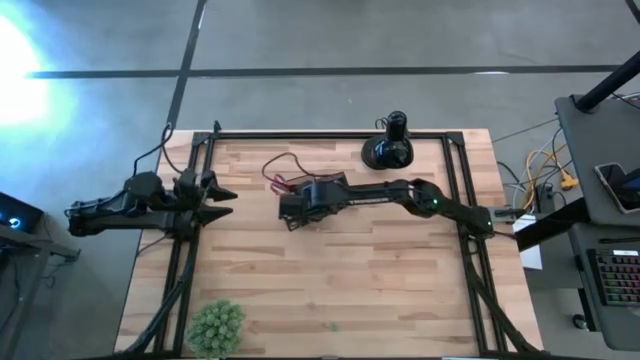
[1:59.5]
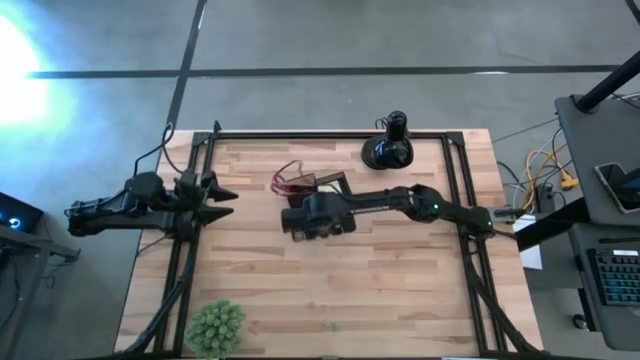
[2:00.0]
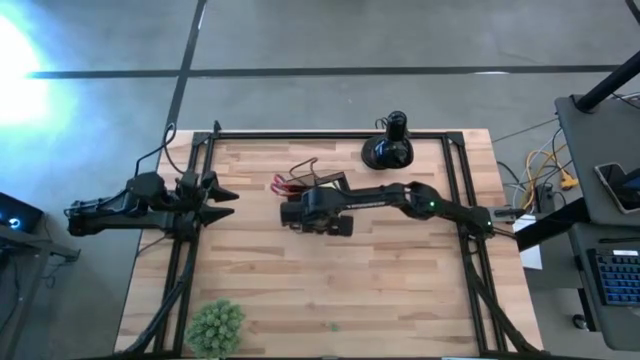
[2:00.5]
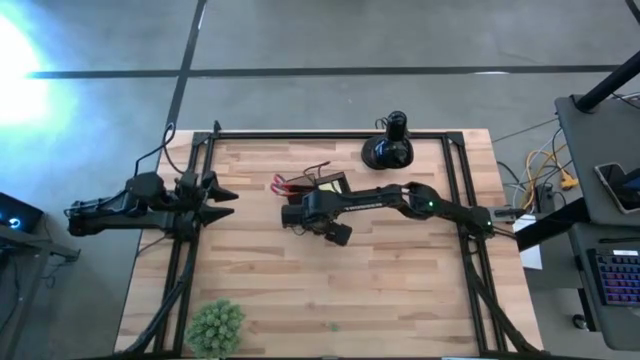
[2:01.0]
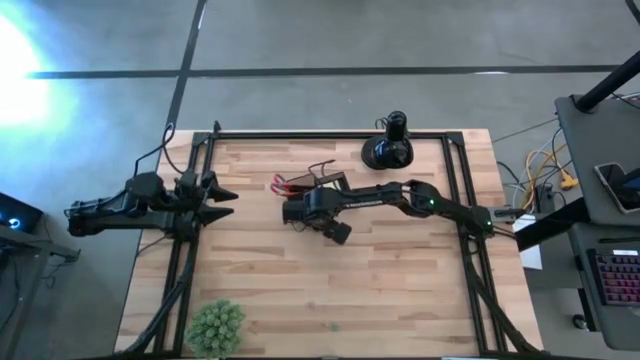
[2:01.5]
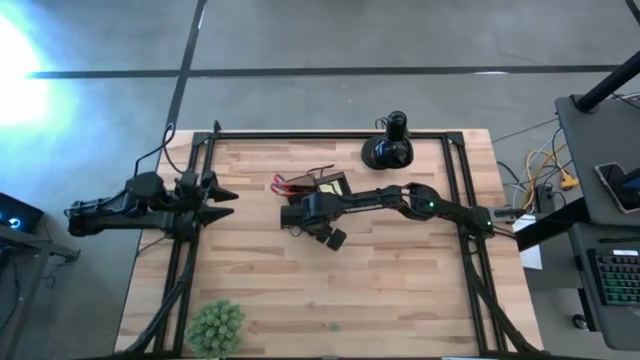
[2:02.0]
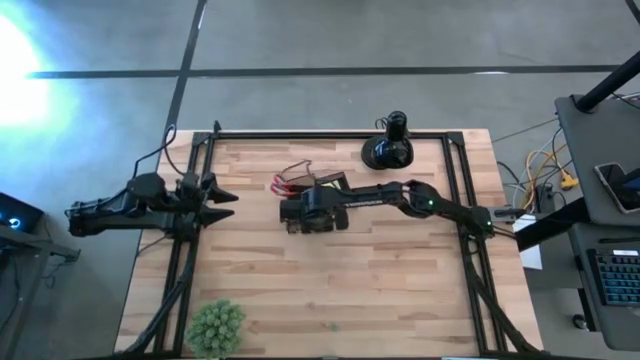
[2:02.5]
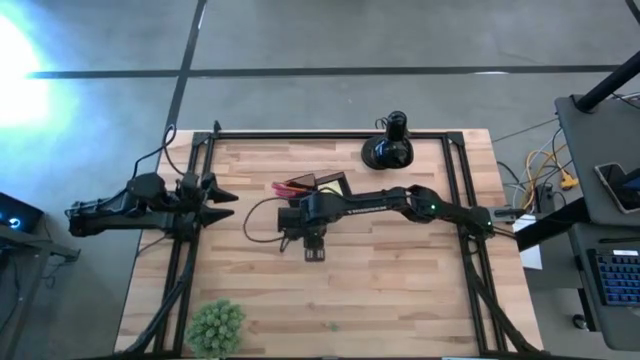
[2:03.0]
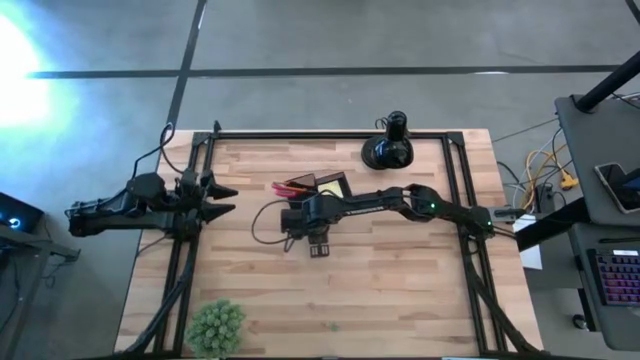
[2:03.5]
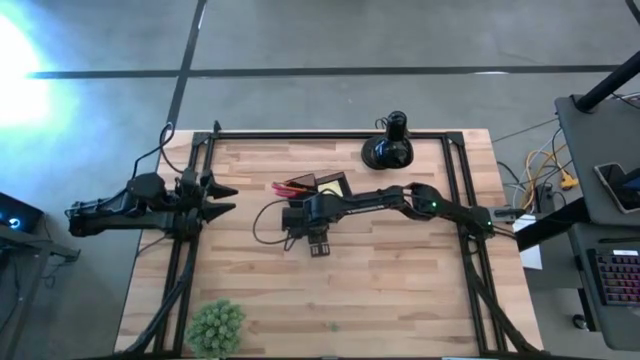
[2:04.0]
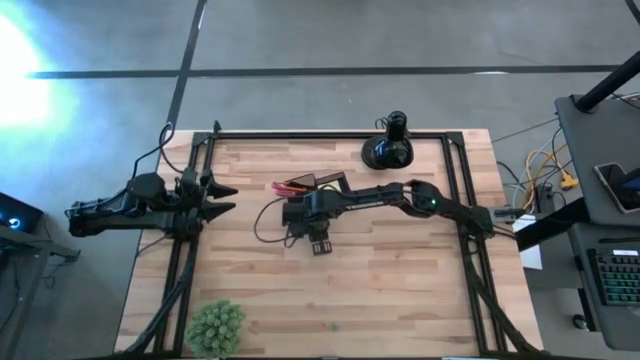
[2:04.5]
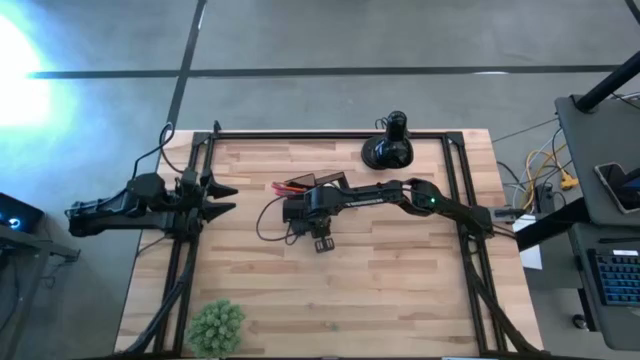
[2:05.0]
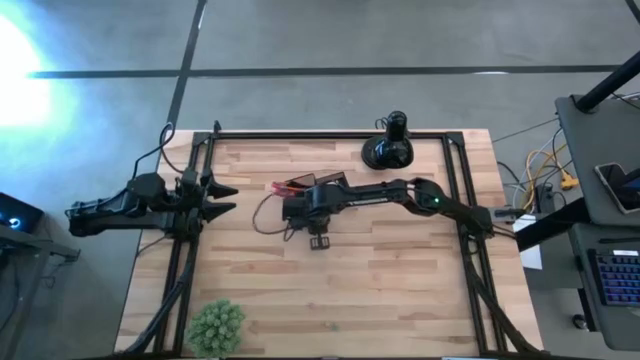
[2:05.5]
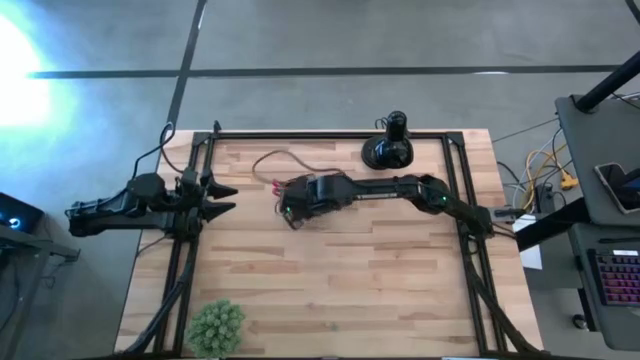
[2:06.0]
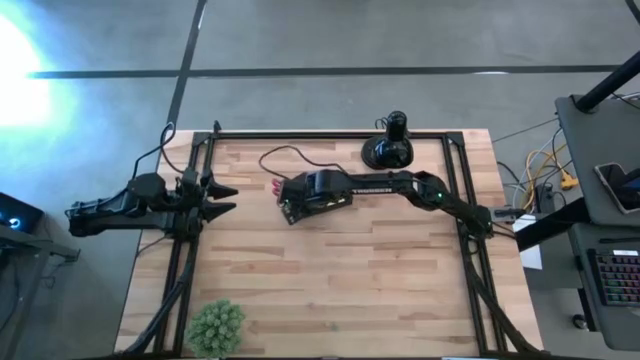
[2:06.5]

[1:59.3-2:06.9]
Task: Pick and place office supplies into organizer
Put the yellow clip into the black organizer

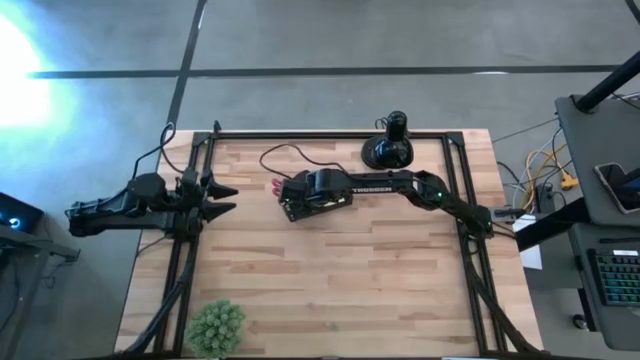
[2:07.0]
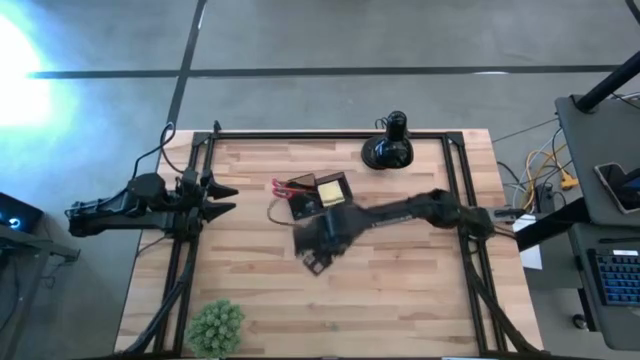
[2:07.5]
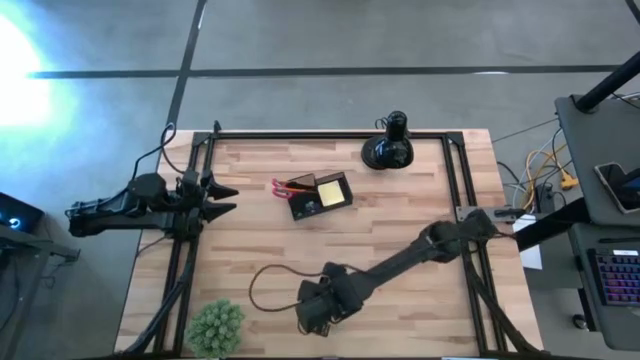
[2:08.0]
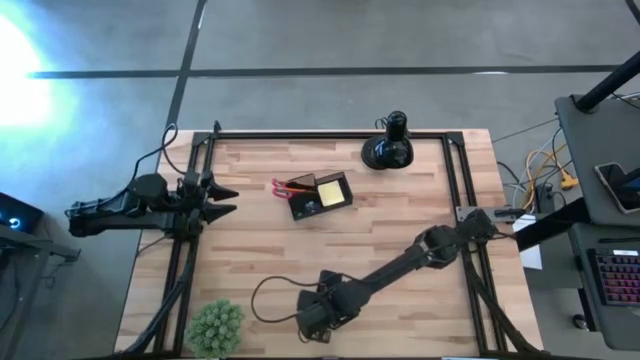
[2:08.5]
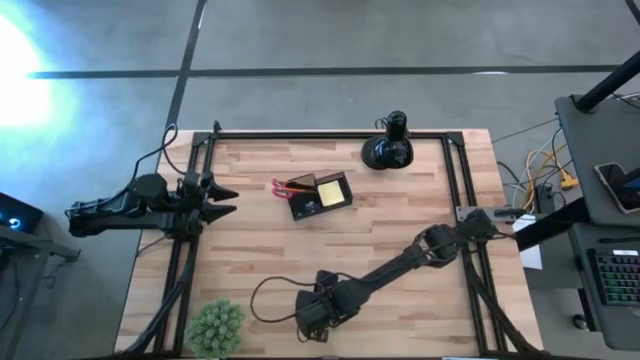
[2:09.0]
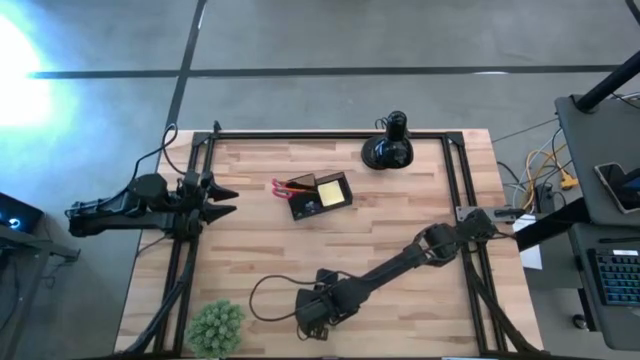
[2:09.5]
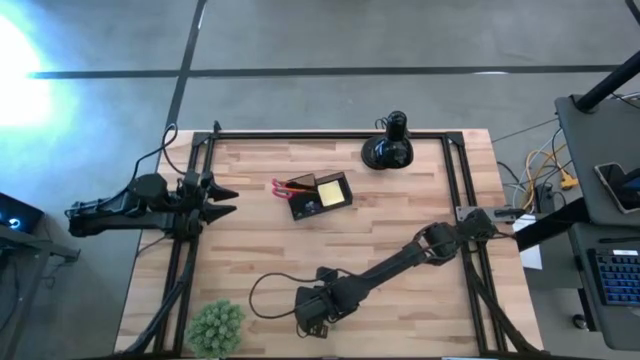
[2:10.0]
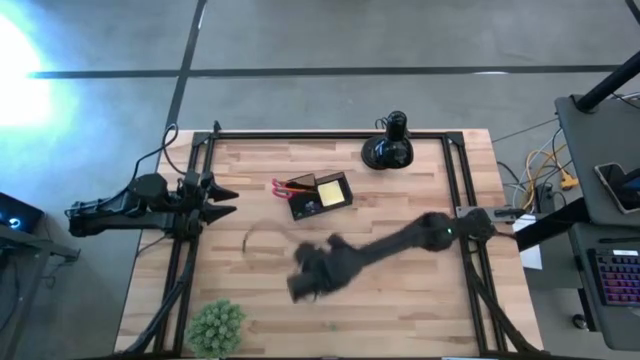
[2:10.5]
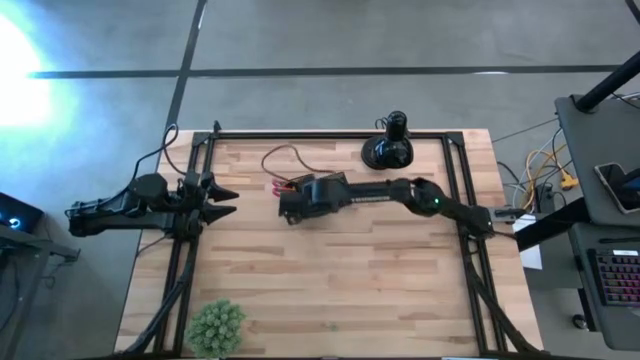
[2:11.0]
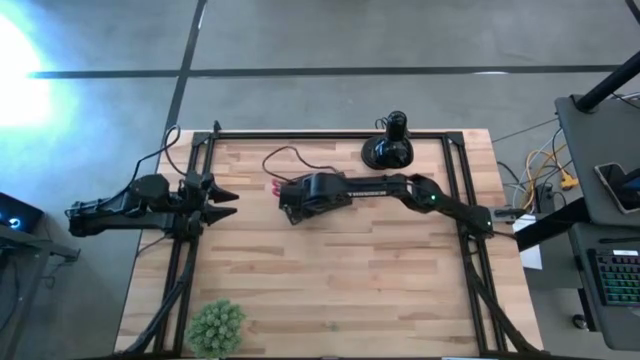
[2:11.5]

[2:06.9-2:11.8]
Put the pink clip into the black organizer

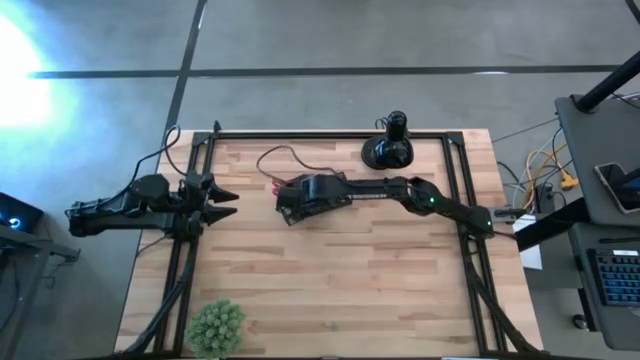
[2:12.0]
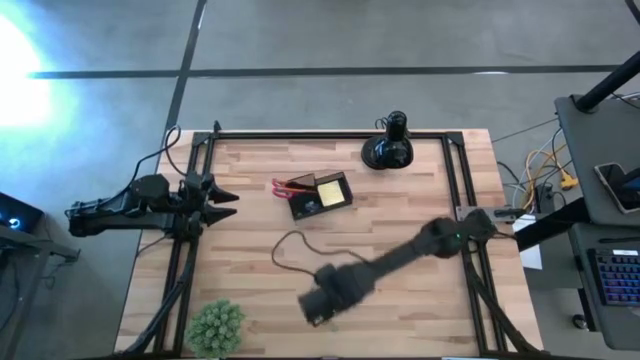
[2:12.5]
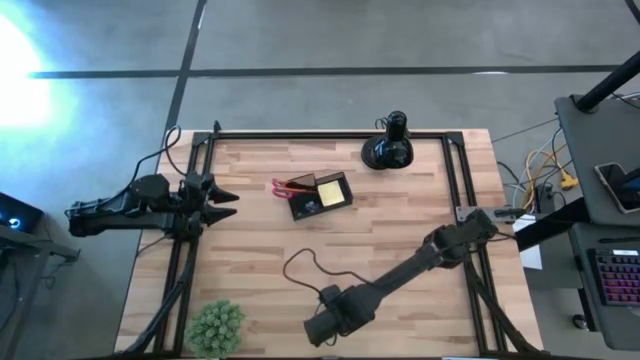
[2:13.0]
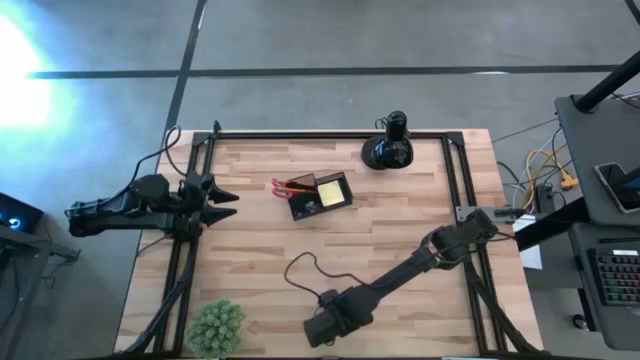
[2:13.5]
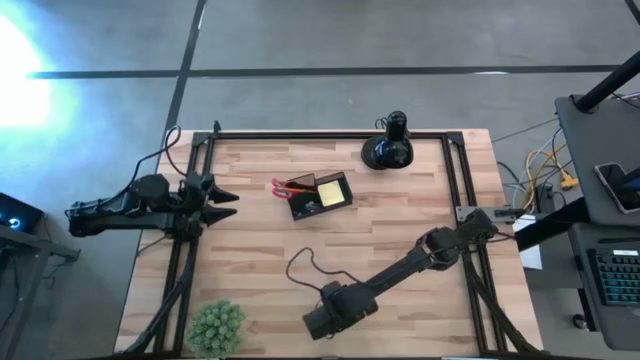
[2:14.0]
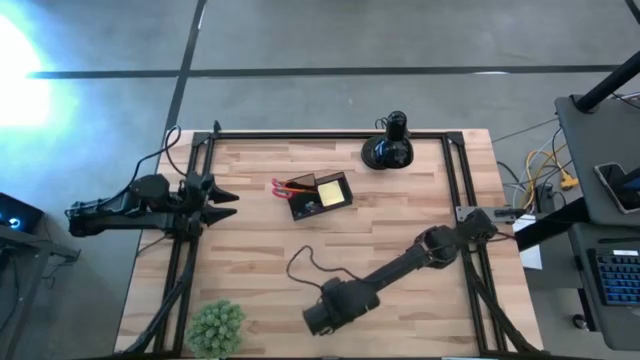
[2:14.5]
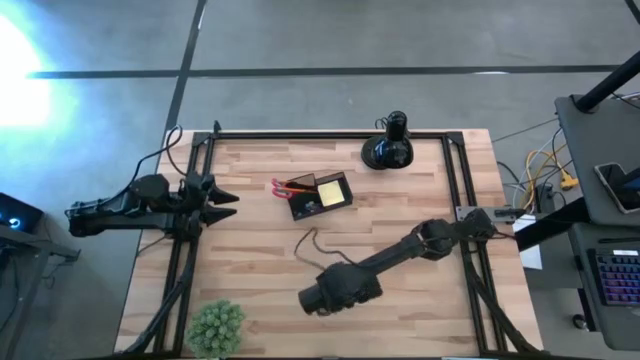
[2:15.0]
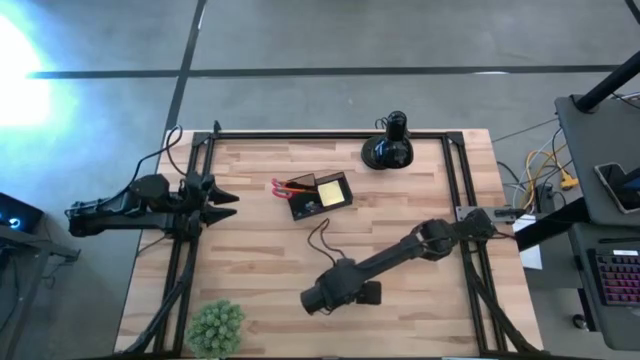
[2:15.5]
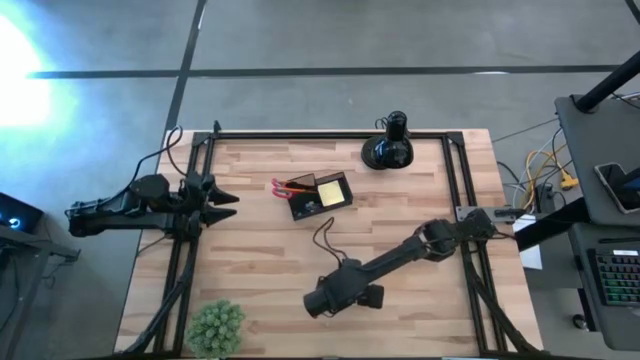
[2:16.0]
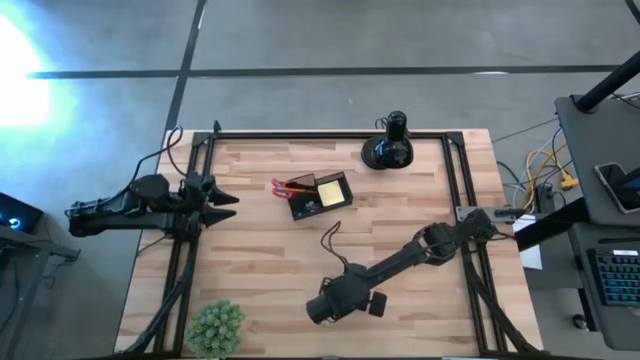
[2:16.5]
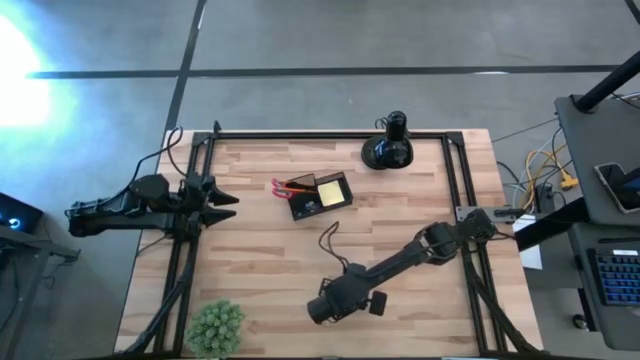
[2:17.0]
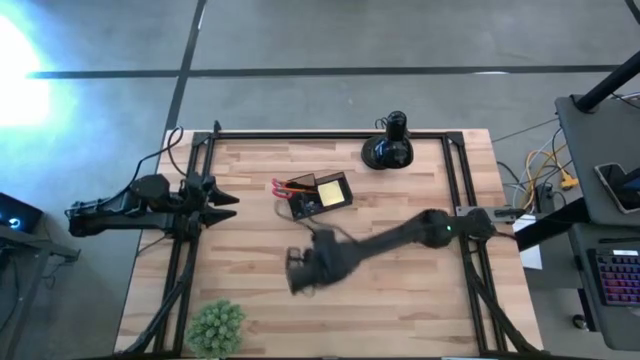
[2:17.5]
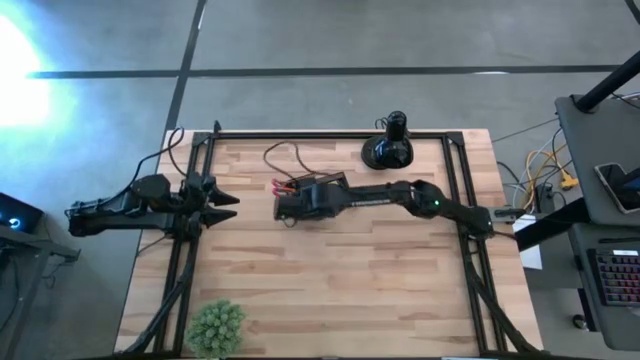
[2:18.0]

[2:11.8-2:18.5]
Put the blue clip into the black organizer

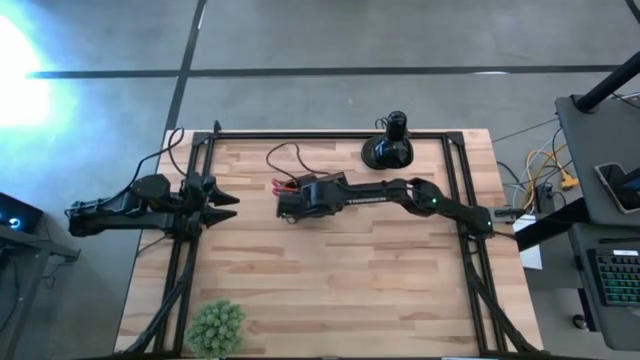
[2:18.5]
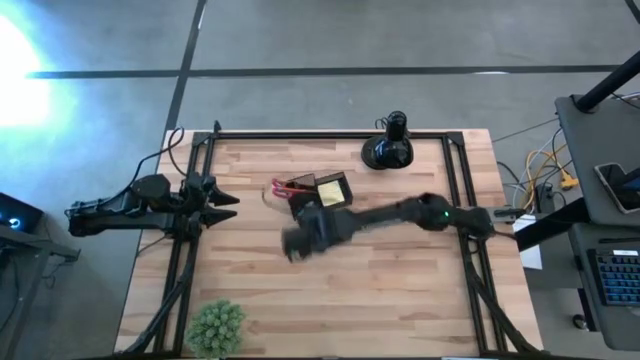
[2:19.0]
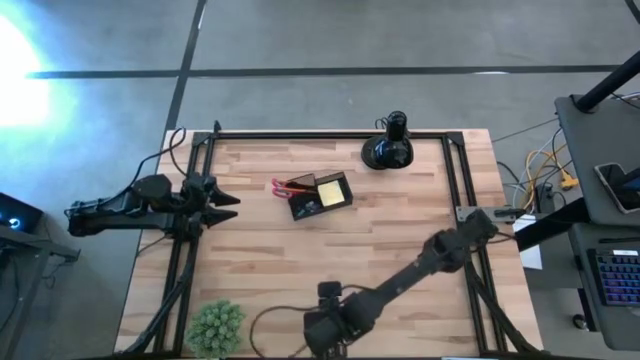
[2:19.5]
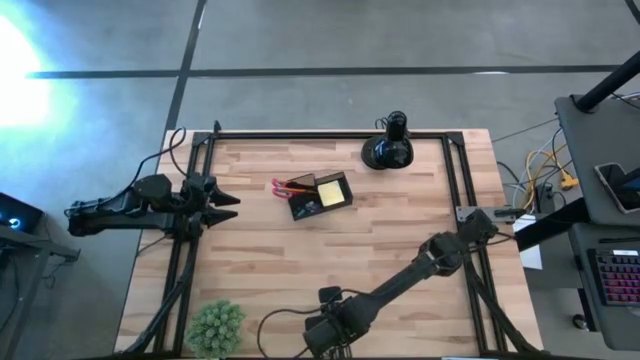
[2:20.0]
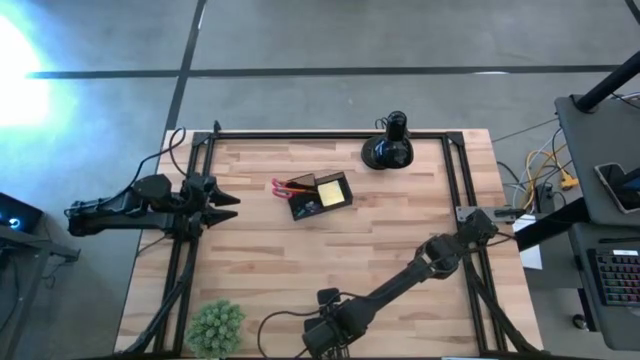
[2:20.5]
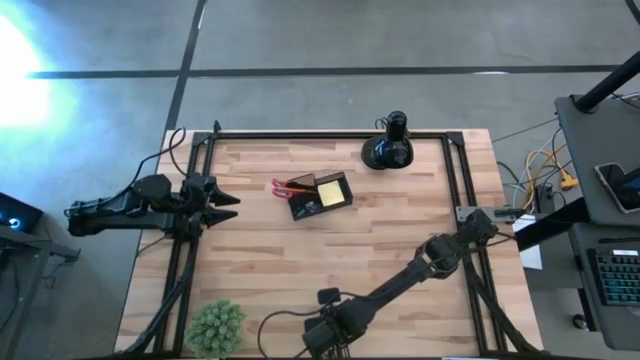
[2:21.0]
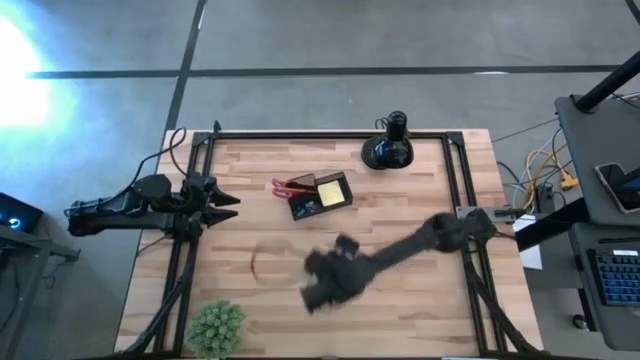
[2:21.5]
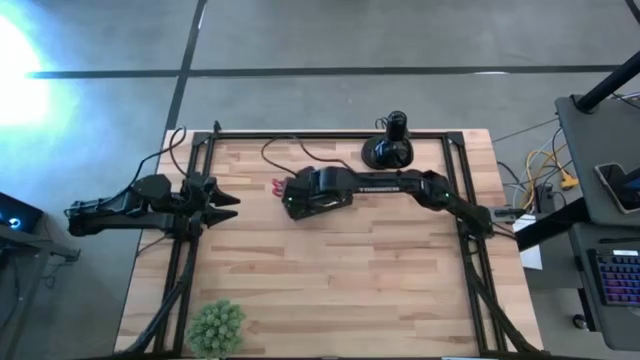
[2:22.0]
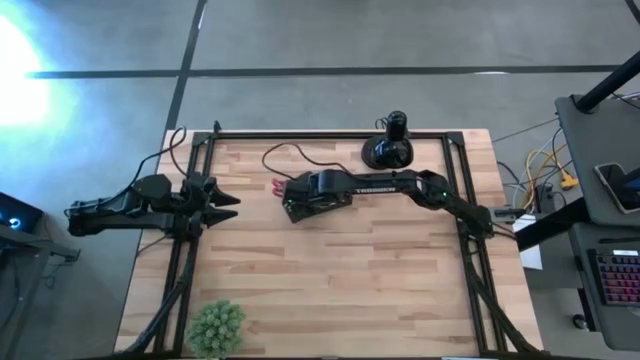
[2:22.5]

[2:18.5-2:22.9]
Put the yellow clip into the black organizer
